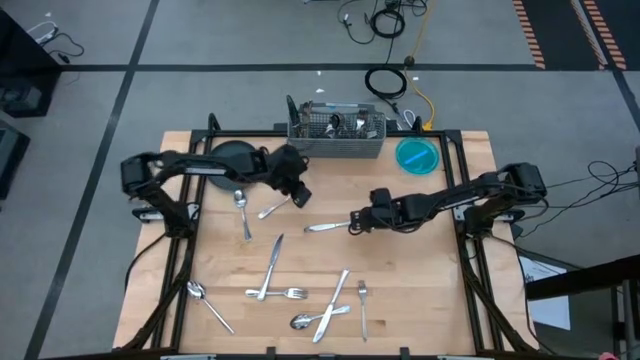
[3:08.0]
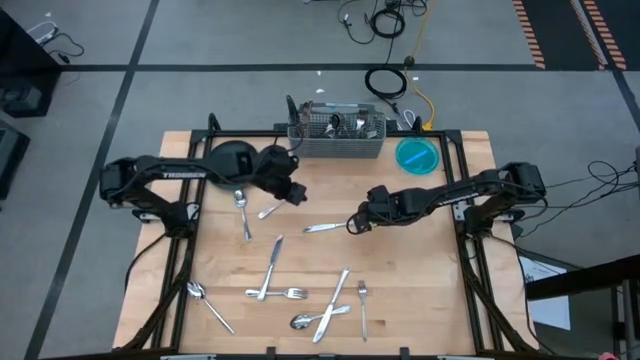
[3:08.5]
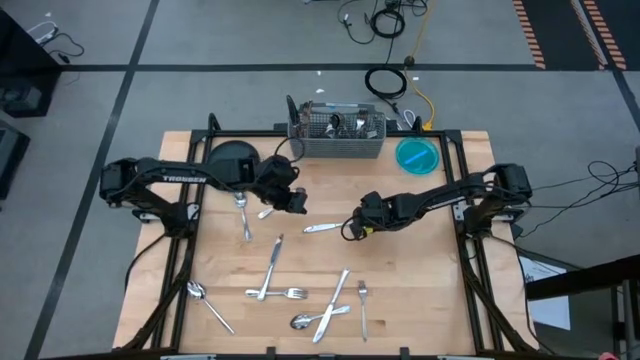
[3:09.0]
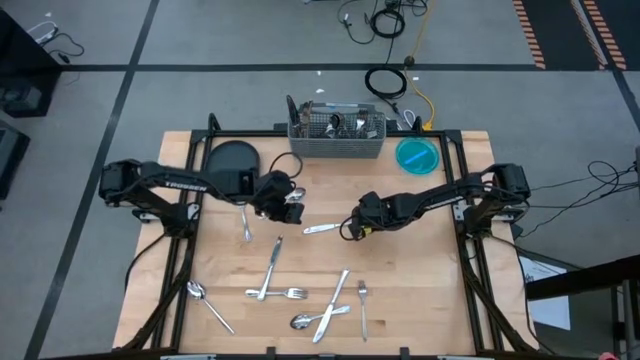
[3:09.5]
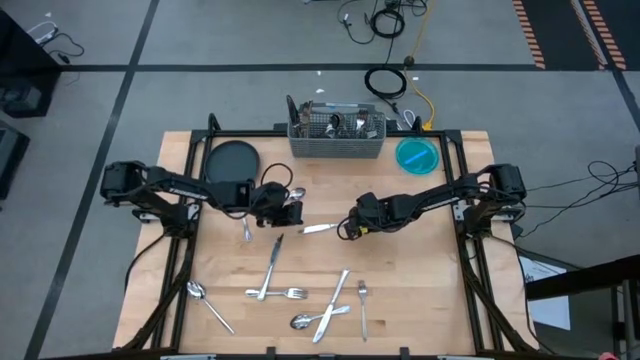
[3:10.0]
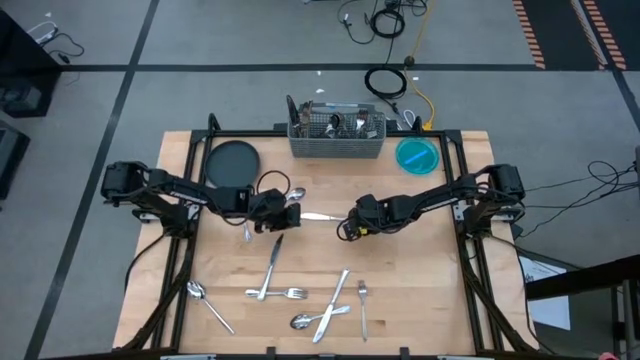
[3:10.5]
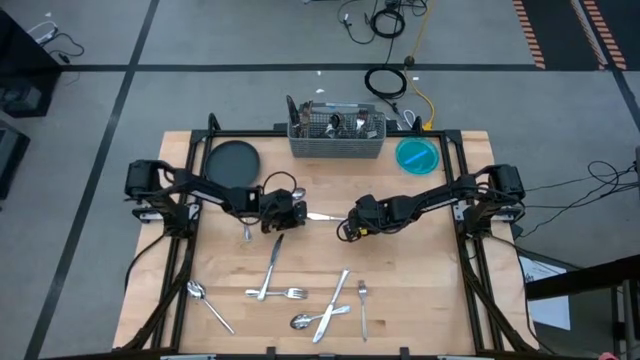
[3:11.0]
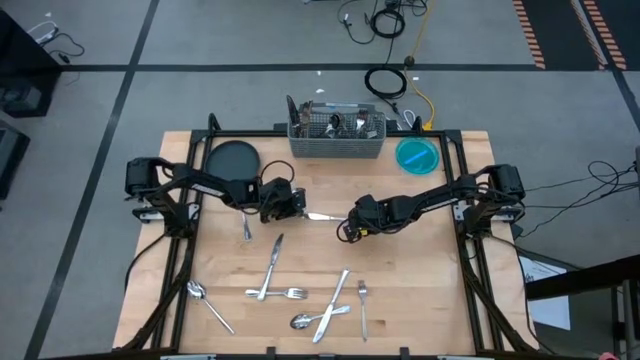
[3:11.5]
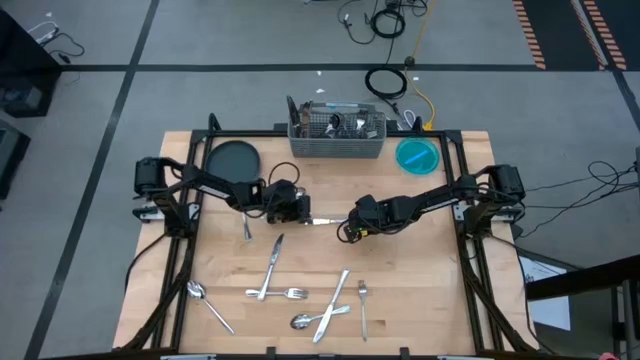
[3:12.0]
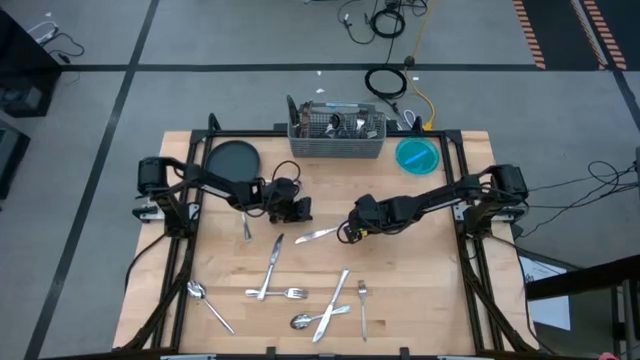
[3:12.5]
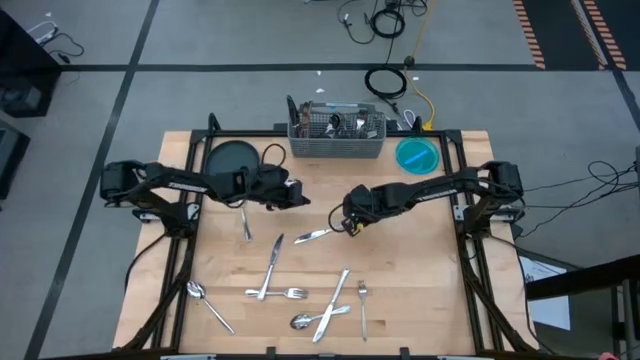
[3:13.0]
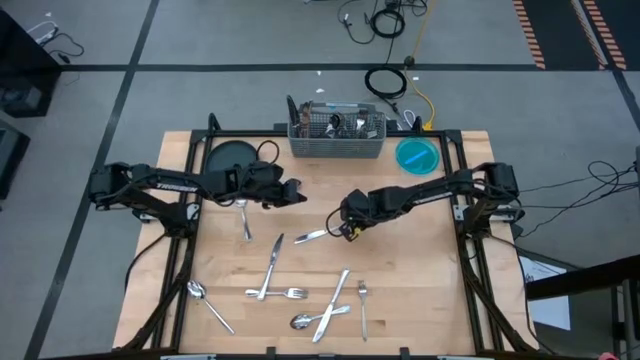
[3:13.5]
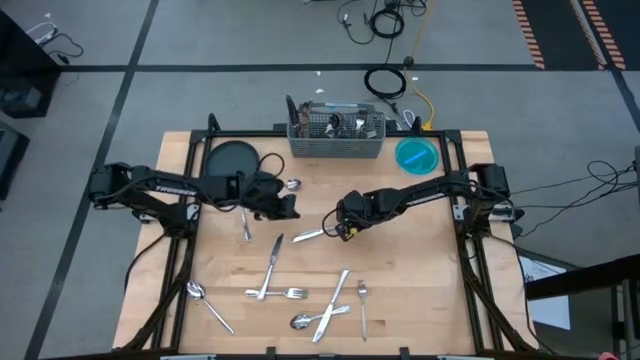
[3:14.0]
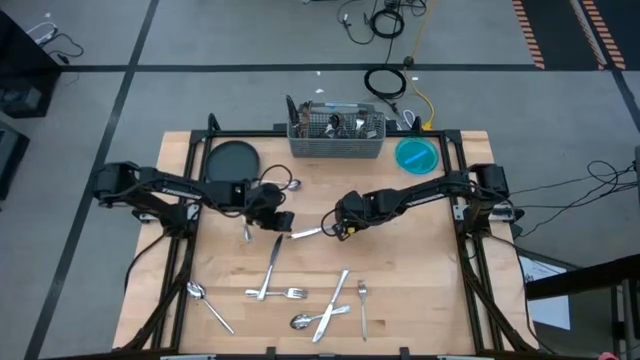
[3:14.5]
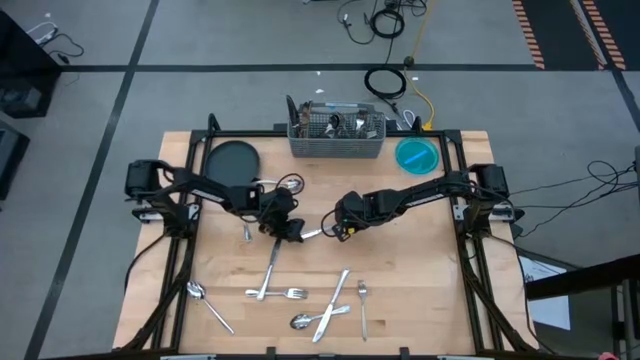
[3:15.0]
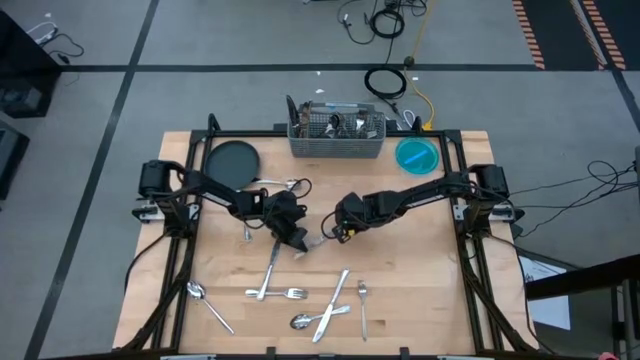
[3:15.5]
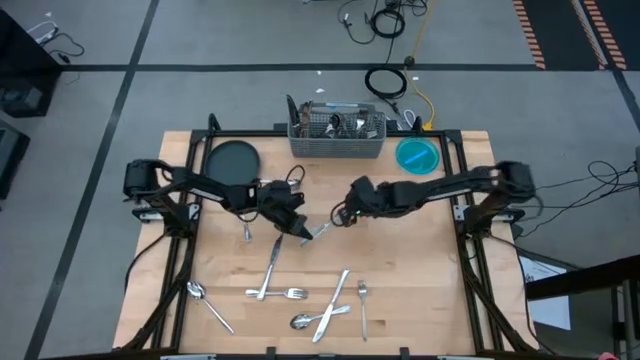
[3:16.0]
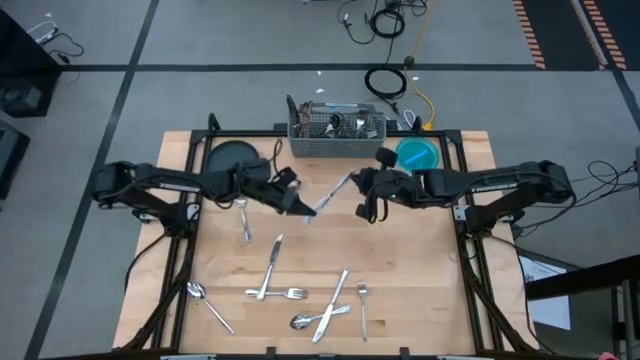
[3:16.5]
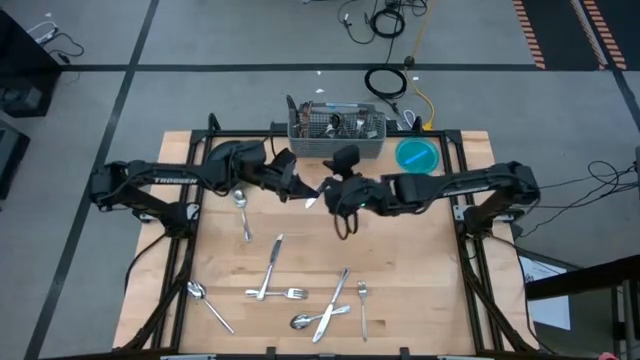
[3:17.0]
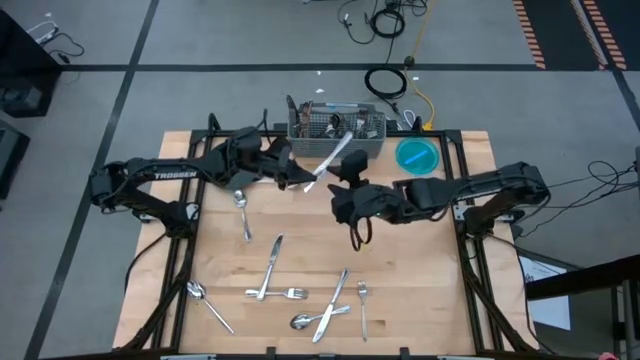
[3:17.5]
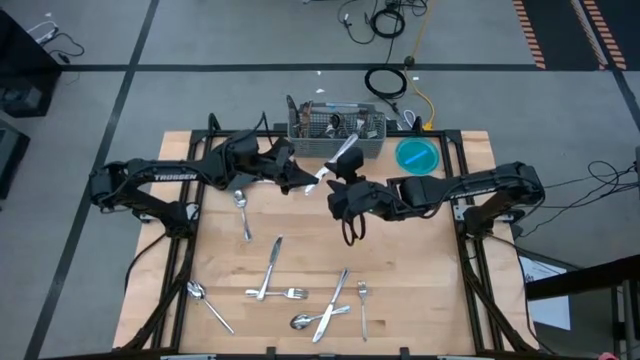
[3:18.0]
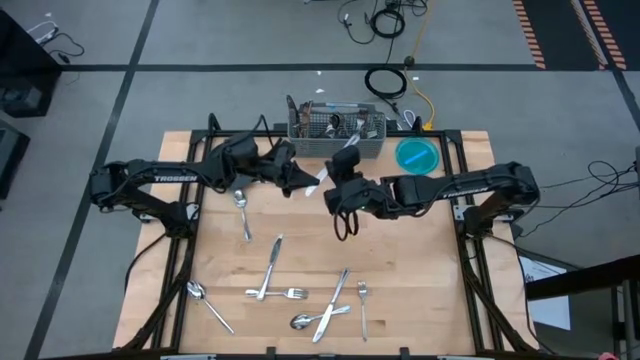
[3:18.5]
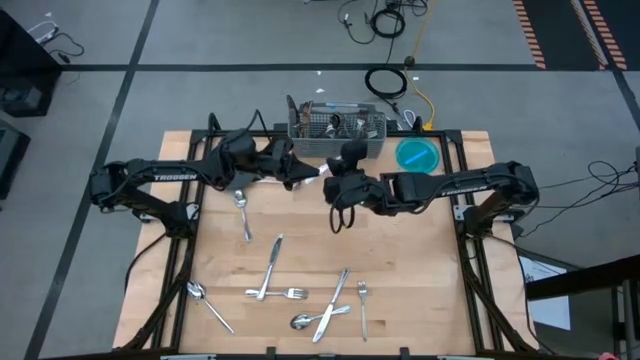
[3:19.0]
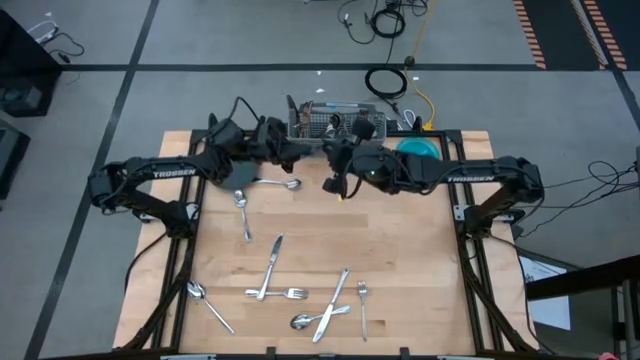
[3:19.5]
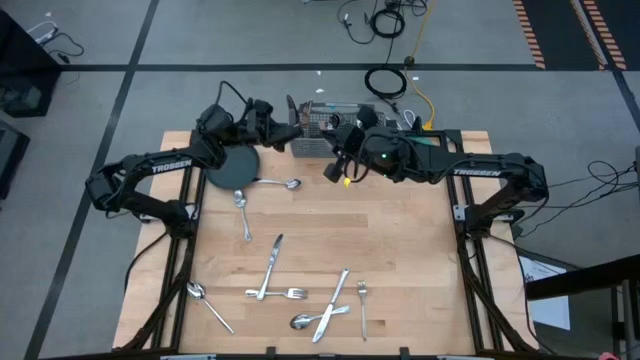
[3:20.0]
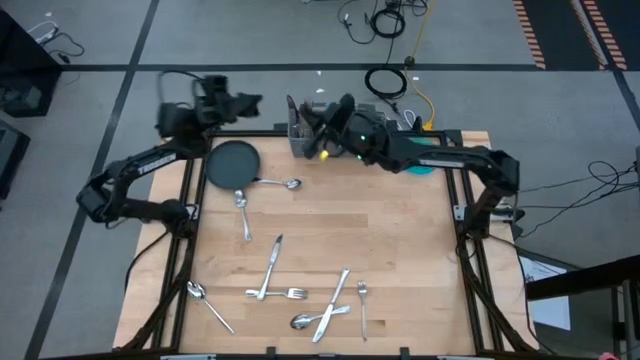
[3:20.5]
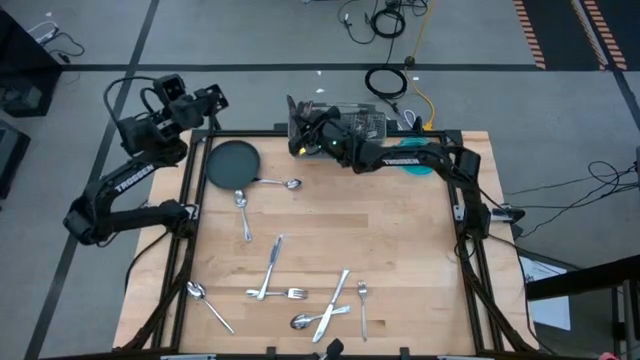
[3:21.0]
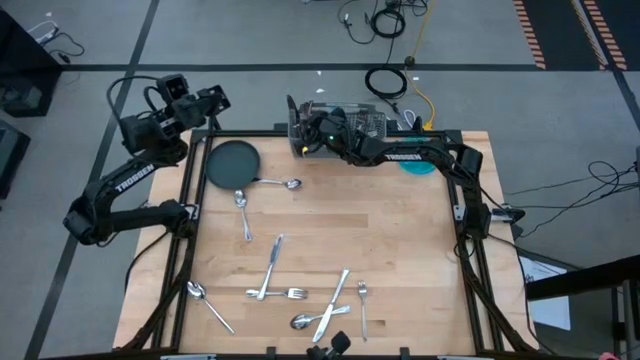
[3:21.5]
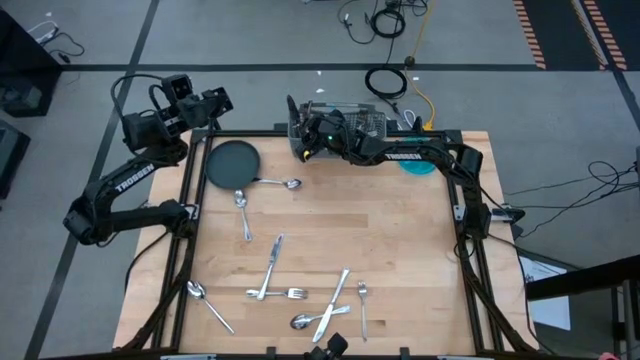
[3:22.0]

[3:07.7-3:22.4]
Task: Sort silverware
Put the table knife into the silverware organizer

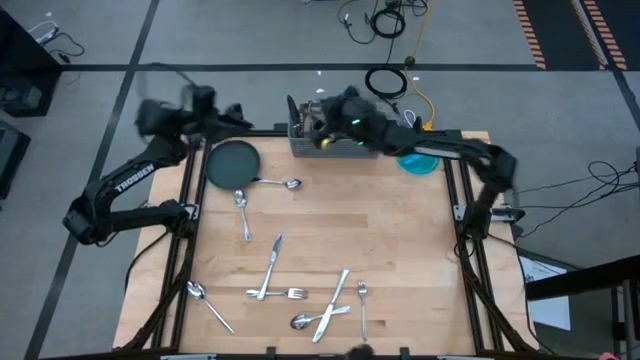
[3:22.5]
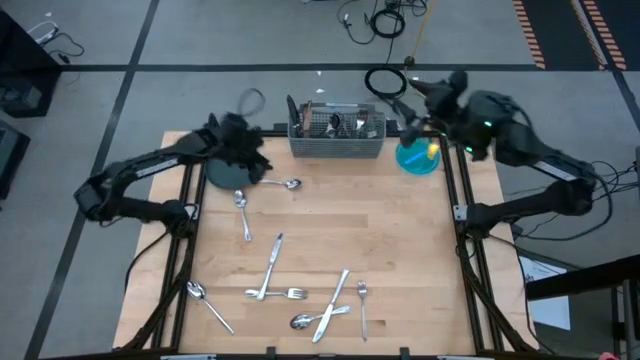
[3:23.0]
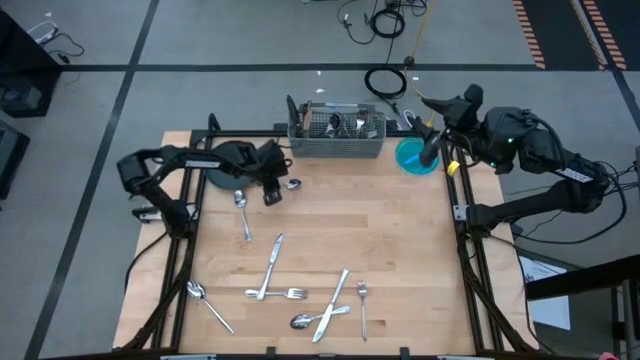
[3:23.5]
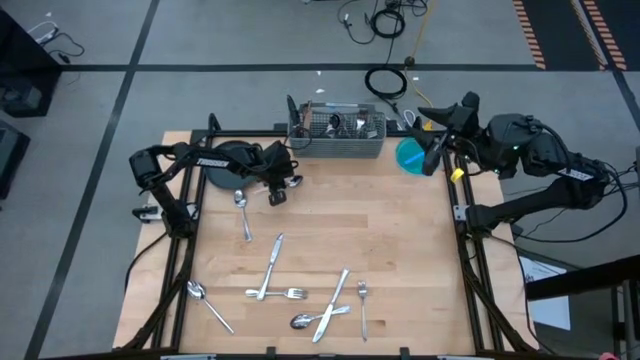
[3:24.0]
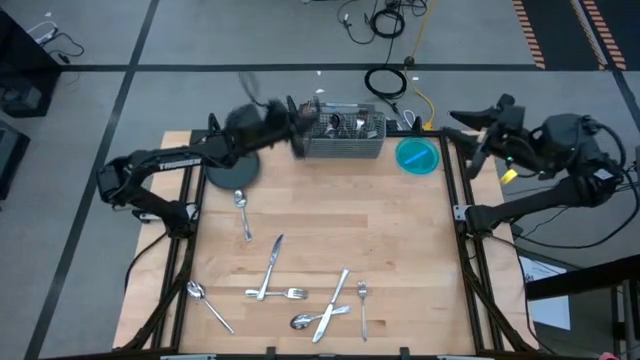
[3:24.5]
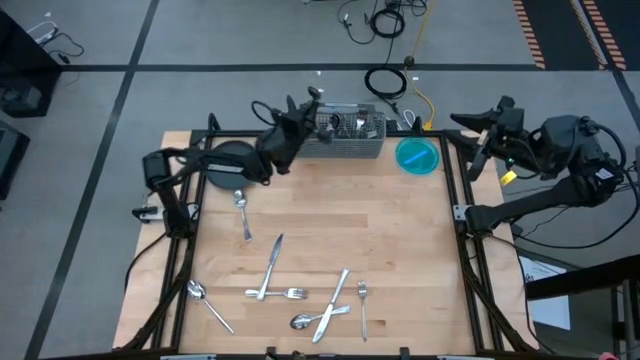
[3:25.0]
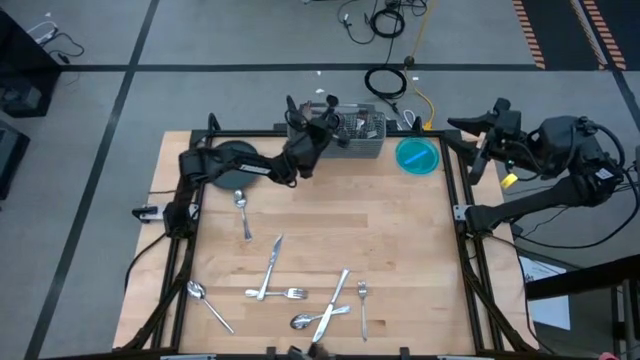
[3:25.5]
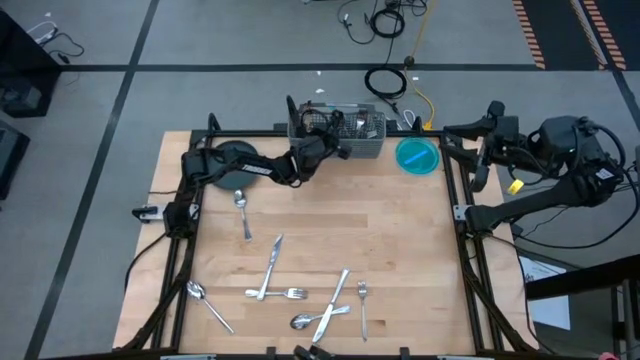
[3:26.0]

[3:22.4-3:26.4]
Put the spoon into the silverware organizer

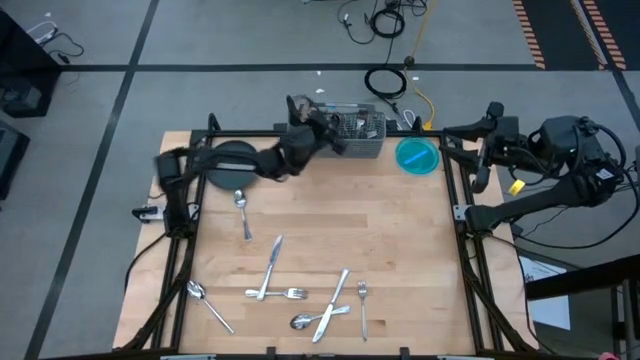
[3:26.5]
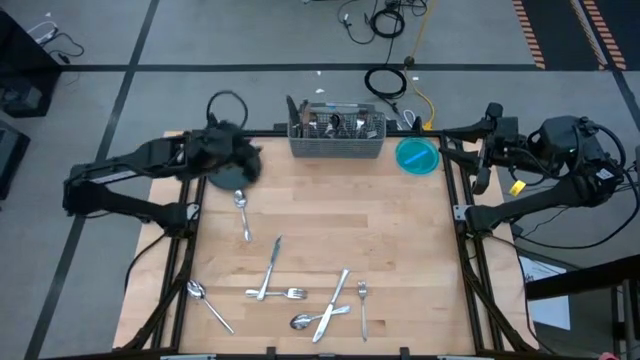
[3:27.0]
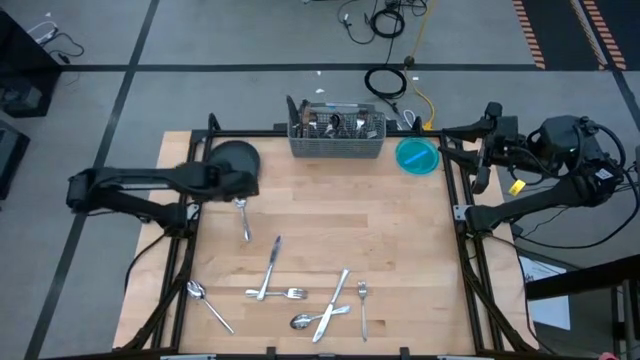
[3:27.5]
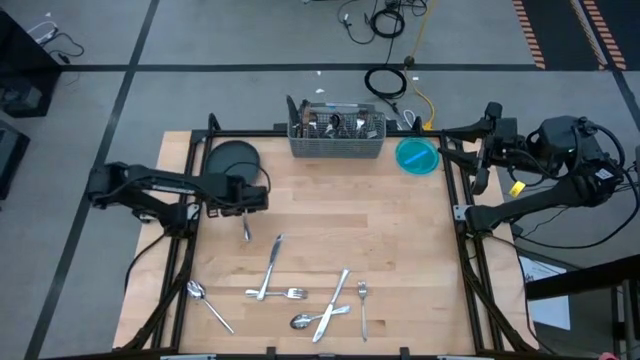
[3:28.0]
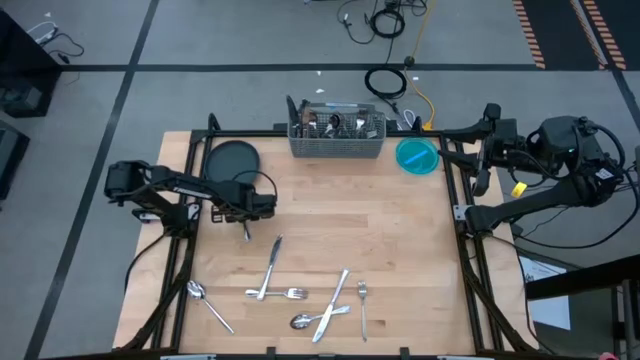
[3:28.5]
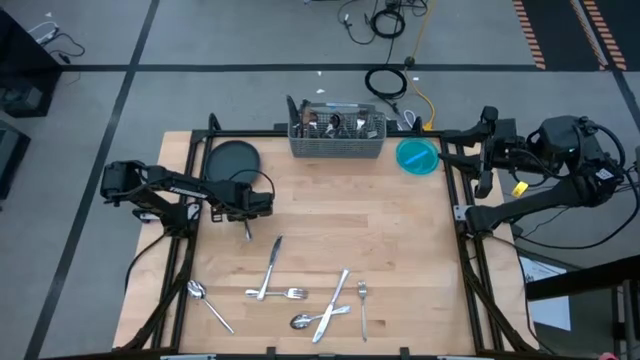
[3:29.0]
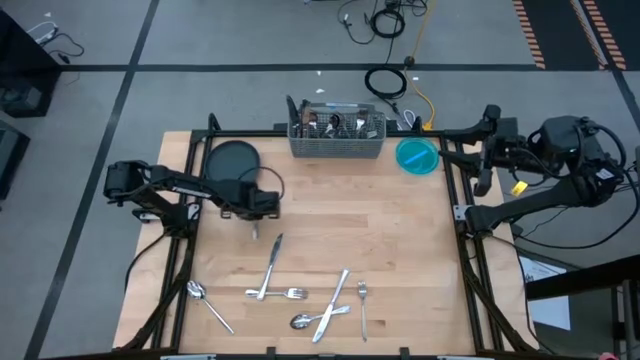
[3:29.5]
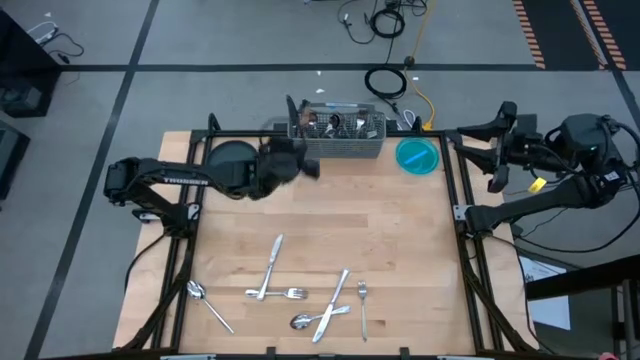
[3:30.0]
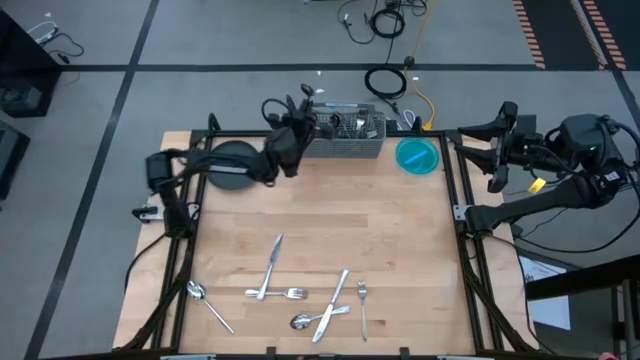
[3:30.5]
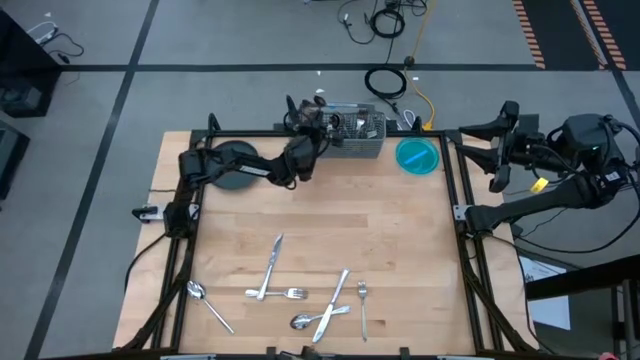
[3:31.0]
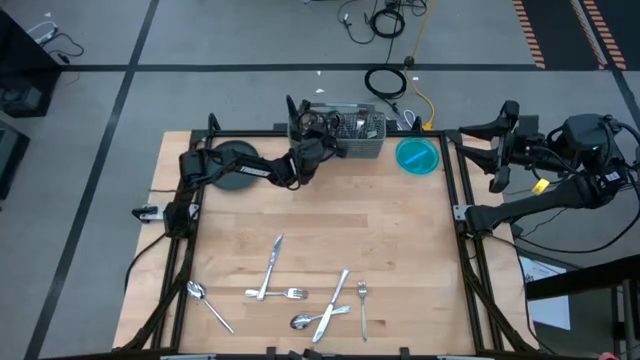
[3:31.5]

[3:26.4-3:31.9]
Put the spoon into the silverware organizer
